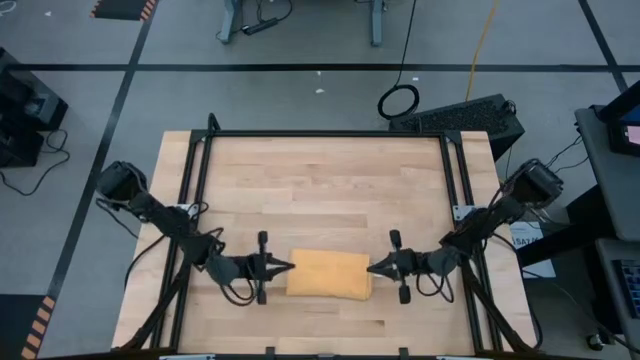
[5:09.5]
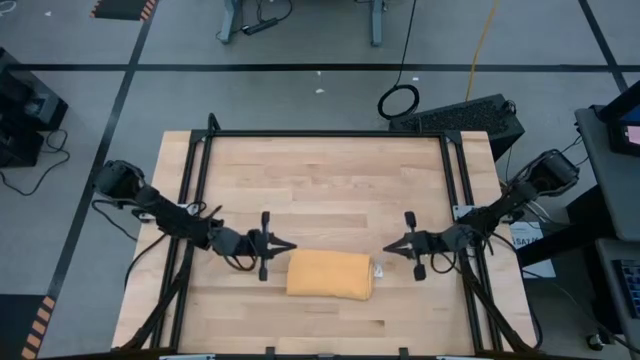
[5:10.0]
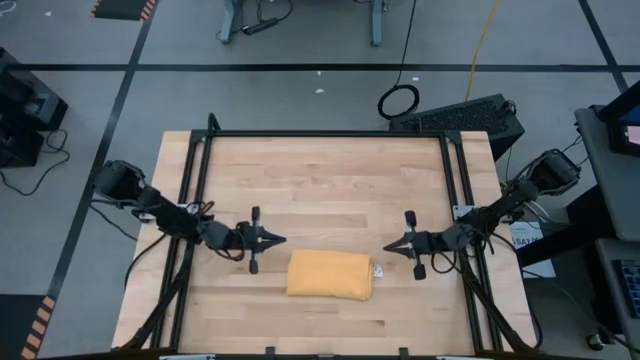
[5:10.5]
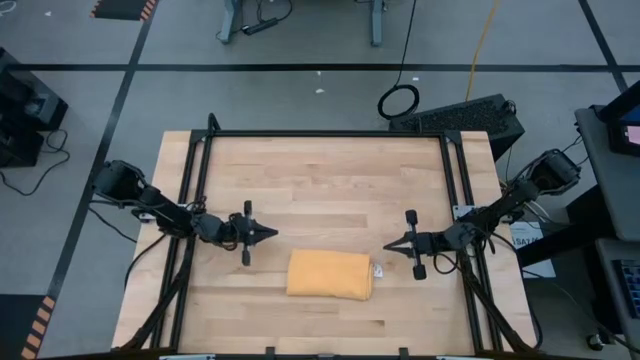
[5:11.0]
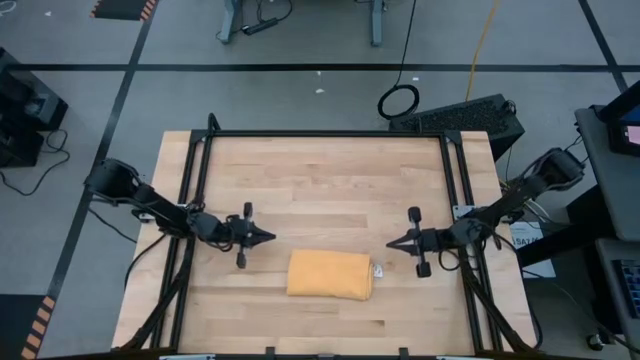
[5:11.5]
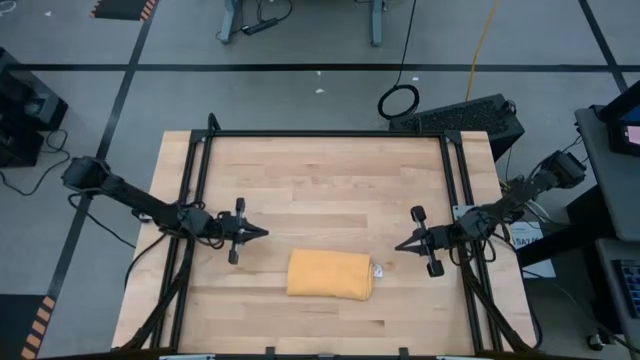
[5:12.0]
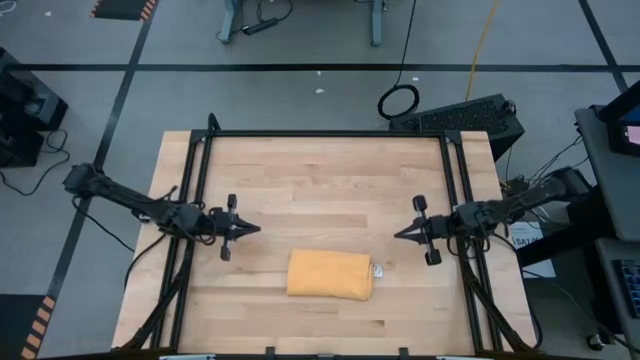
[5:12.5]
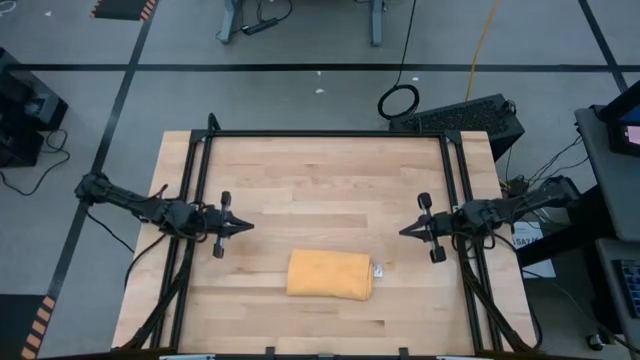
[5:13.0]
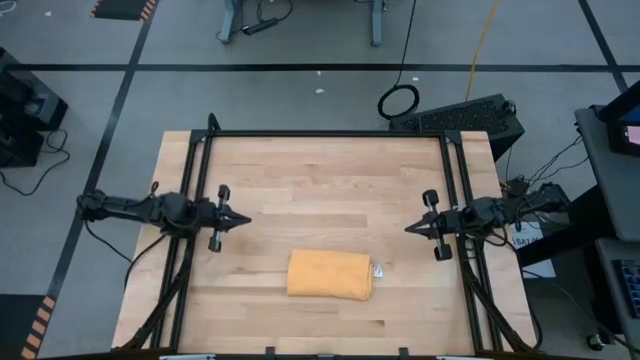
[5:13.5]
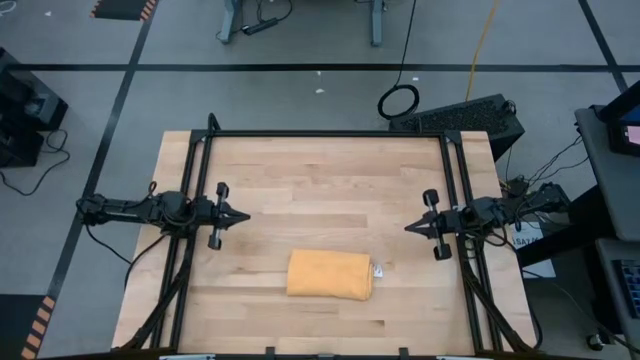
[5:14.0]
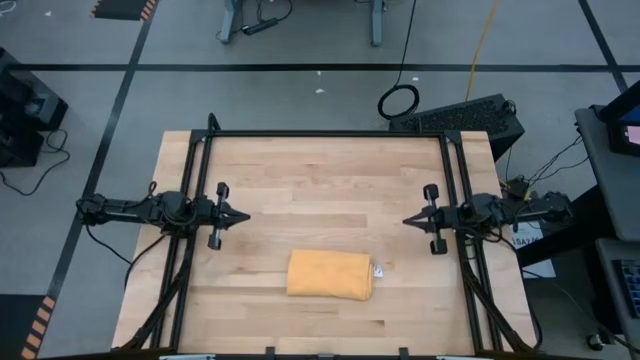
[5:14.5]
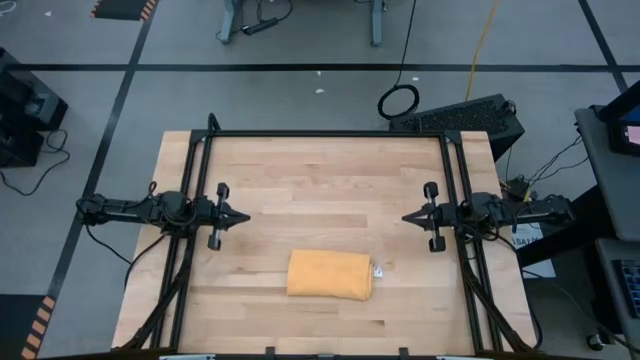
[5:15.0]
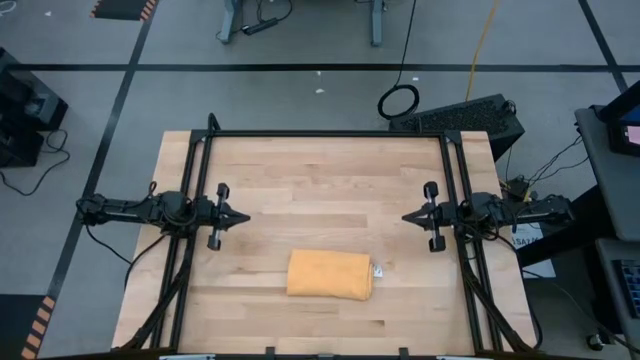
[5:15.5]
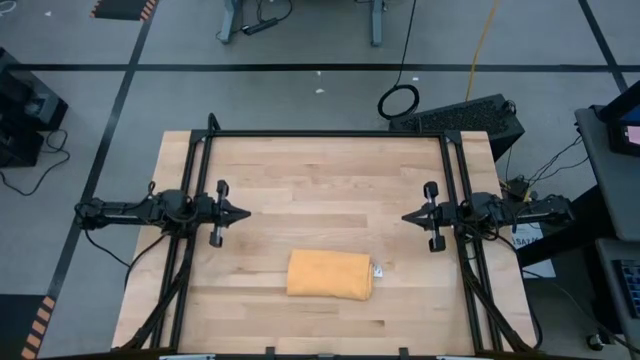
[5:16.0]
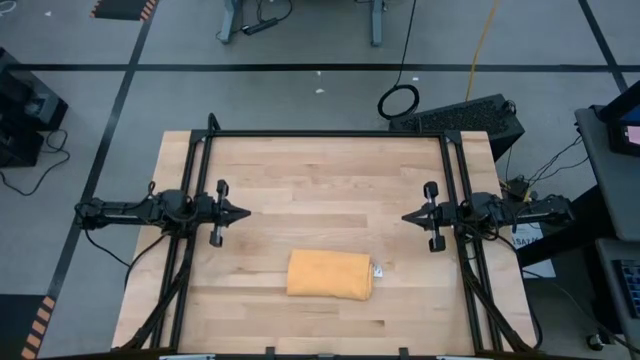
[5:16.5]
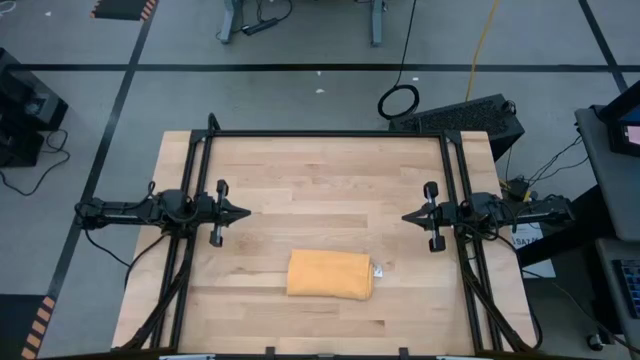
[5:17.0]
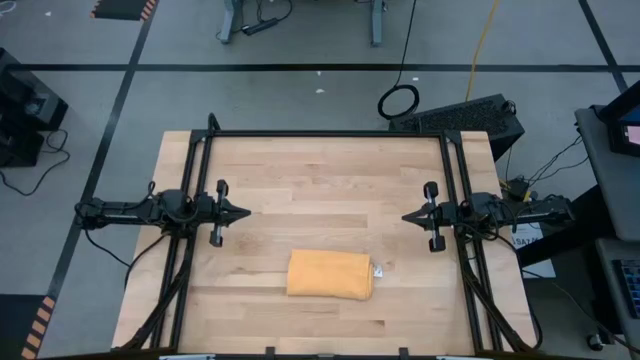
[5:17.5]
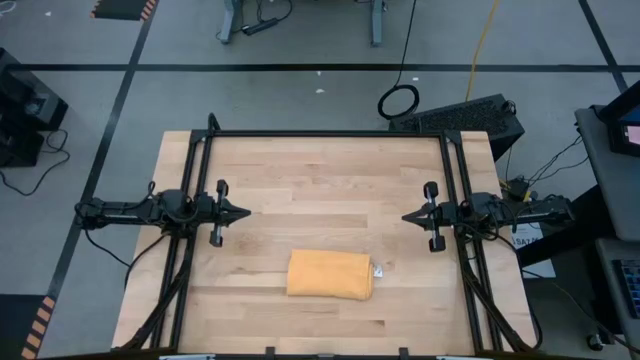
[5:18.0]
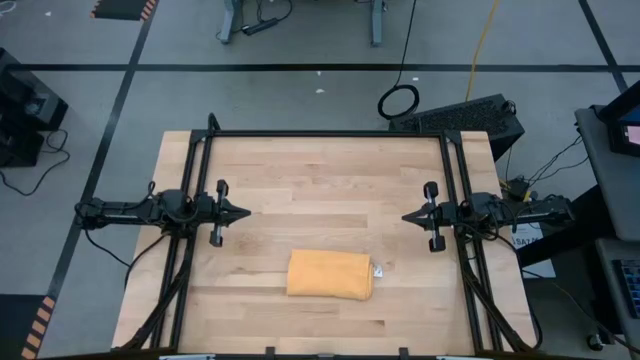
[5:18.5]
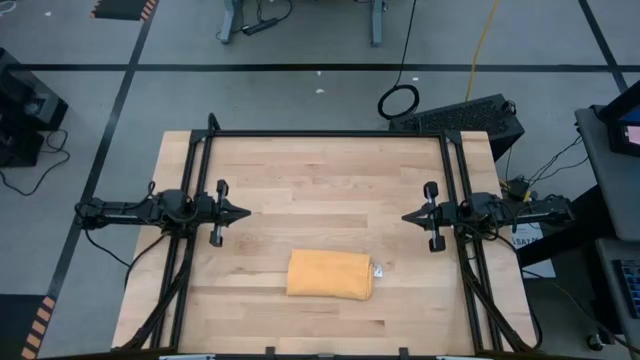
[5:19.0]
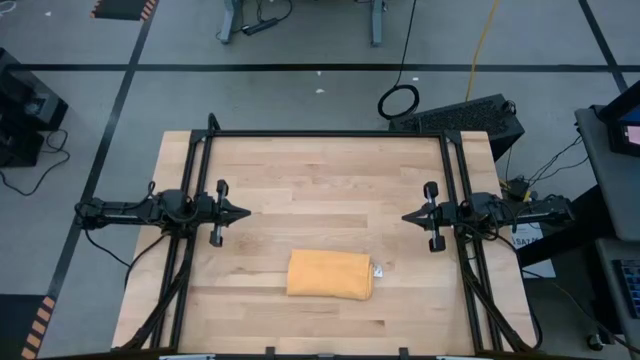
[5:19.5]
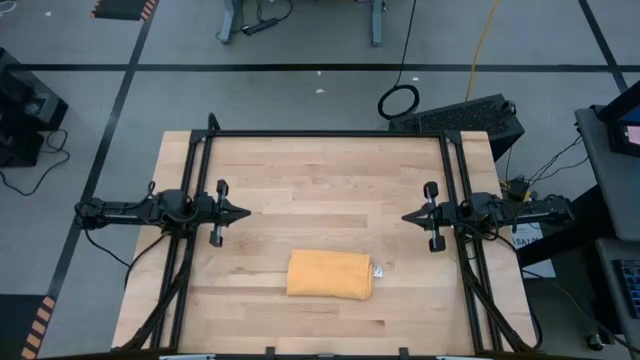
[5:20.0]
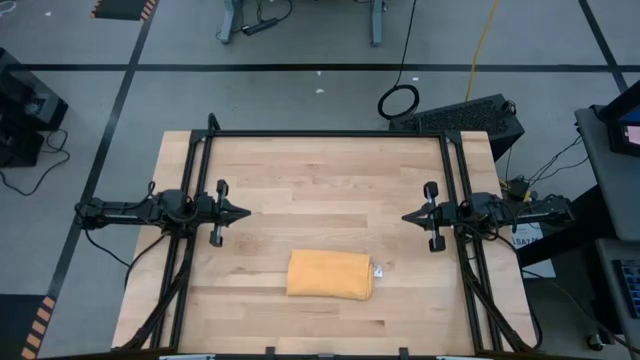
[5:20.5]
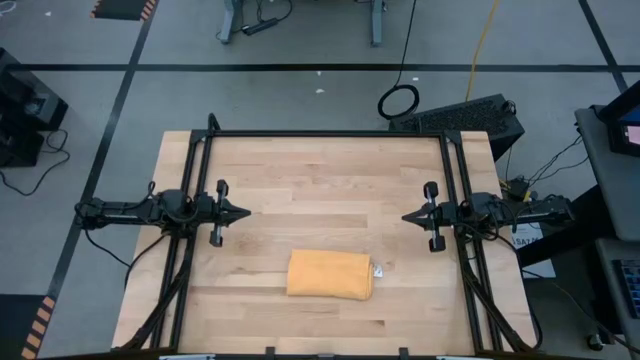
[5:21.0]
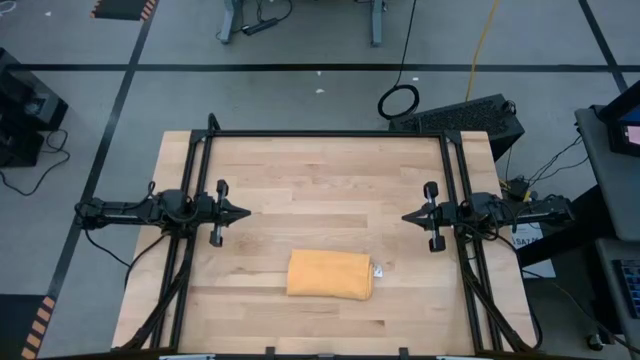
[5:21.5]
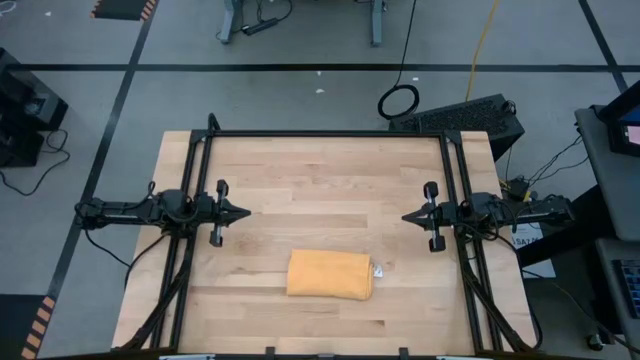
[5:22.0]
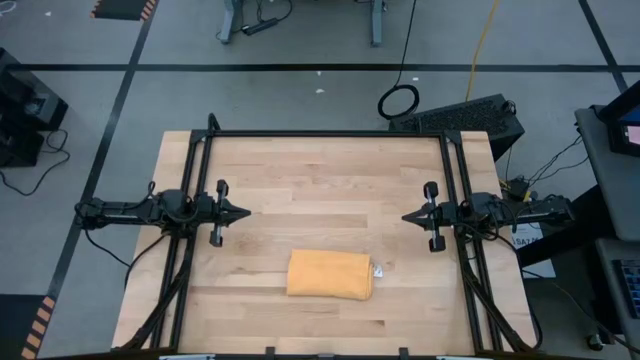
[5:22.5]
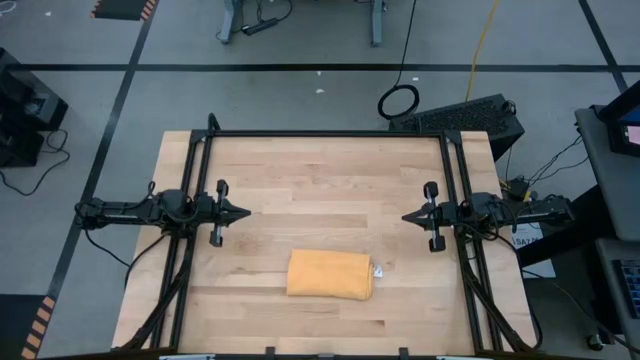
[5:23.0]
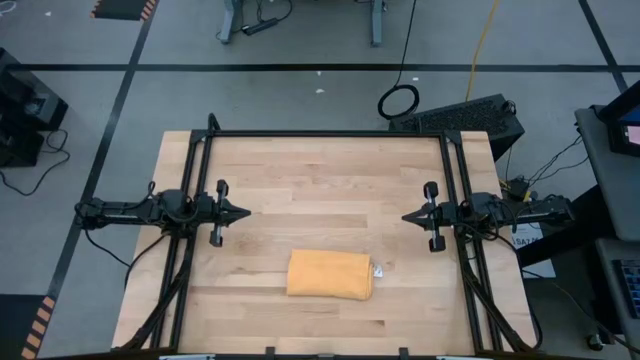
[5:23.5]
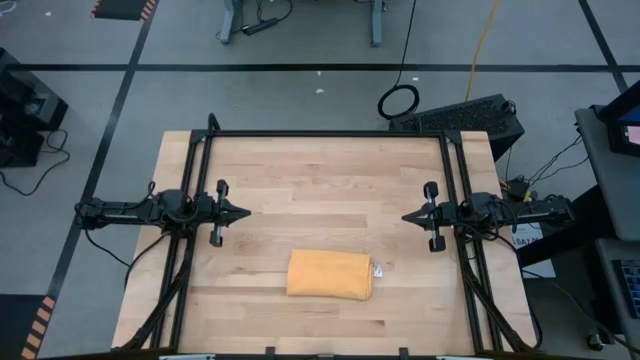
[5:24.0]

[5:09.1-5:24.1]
Task: Roll towel
Return to Home Position

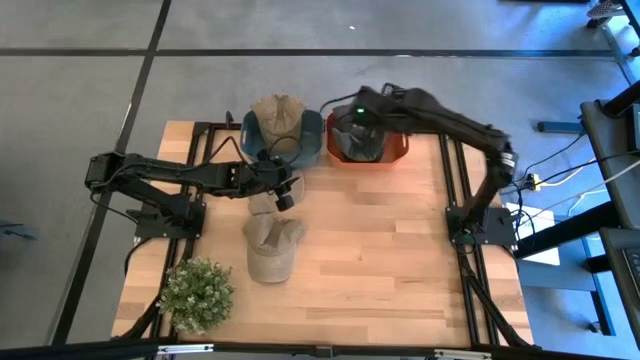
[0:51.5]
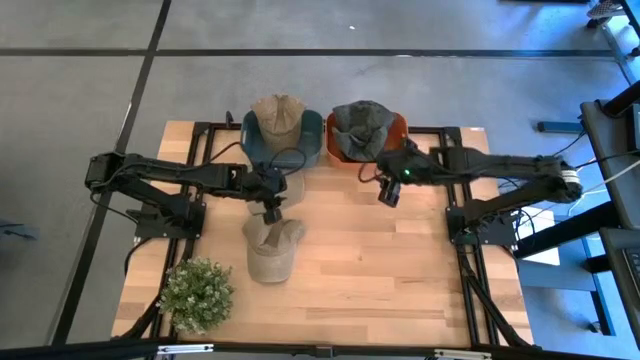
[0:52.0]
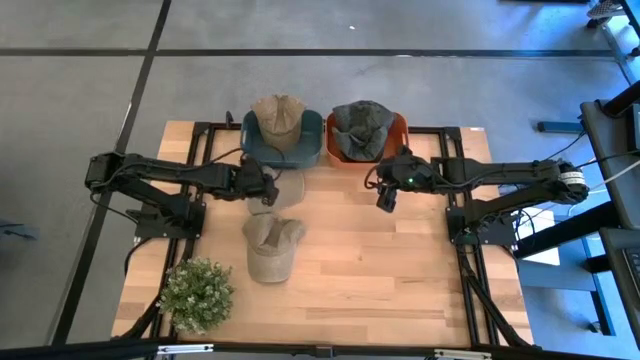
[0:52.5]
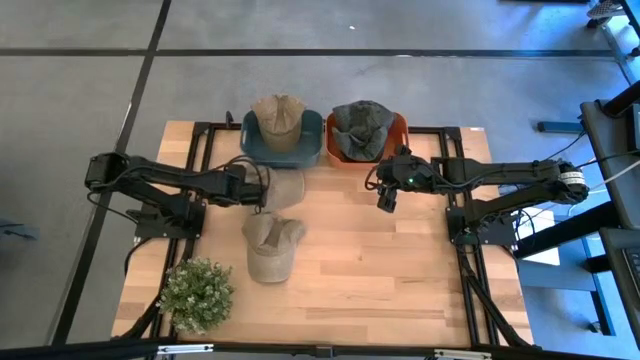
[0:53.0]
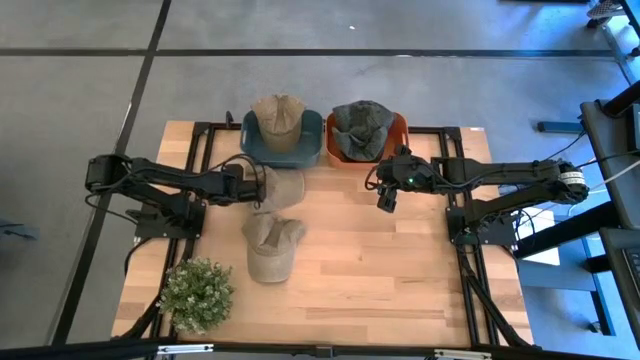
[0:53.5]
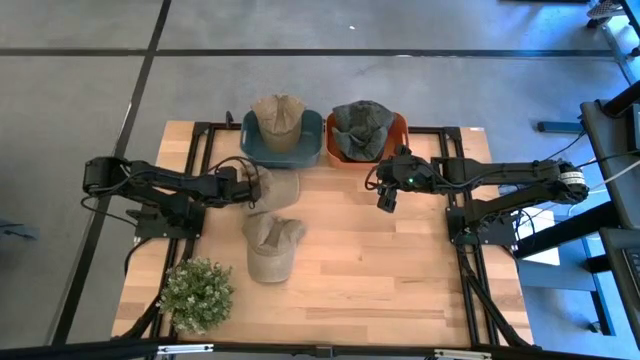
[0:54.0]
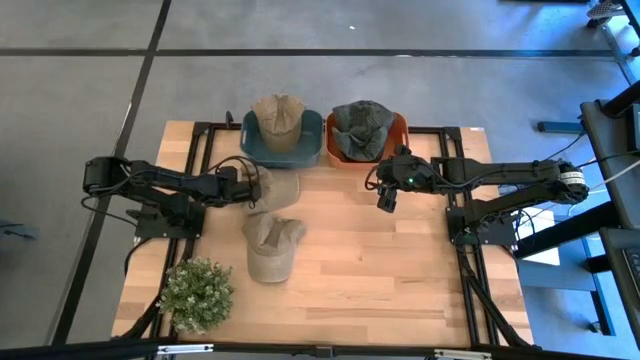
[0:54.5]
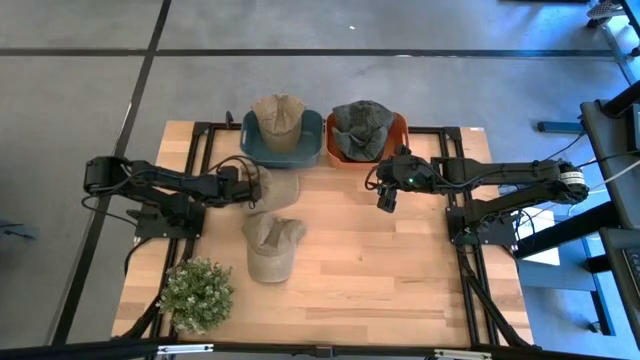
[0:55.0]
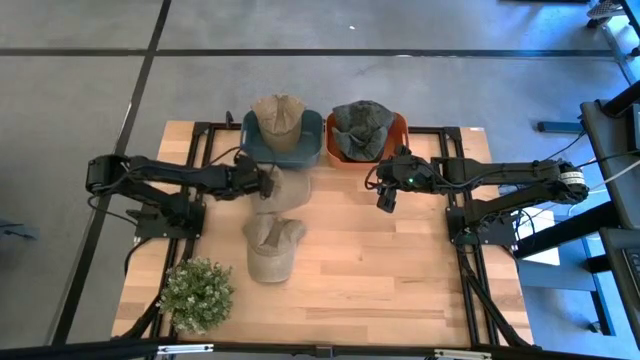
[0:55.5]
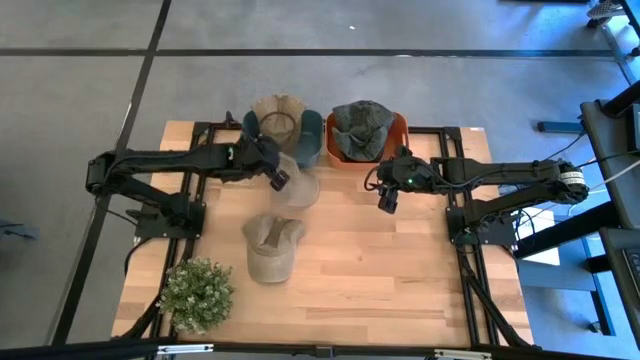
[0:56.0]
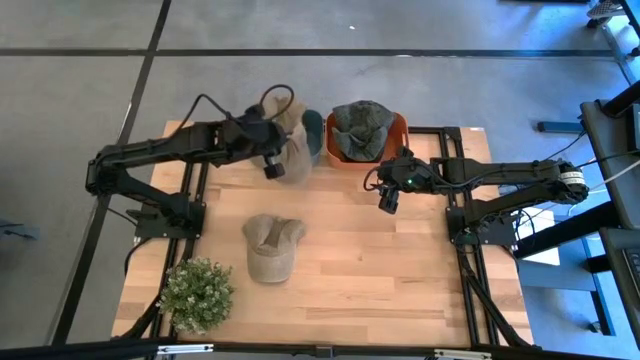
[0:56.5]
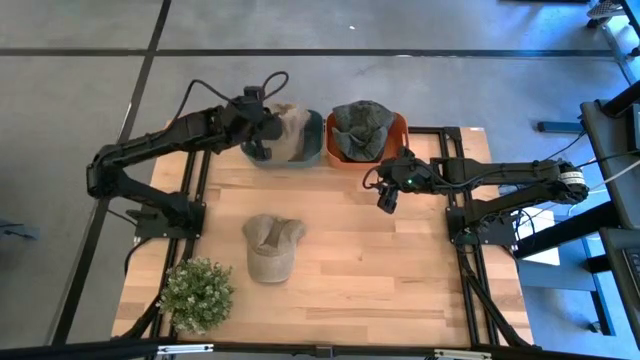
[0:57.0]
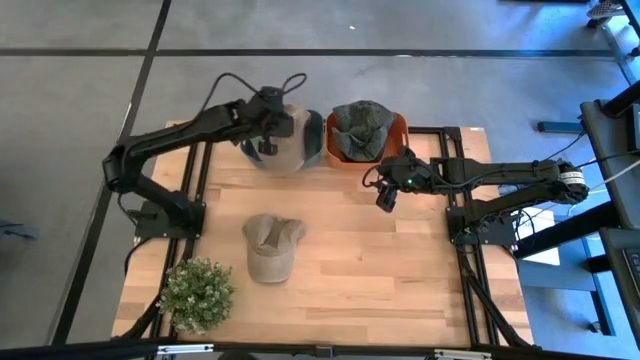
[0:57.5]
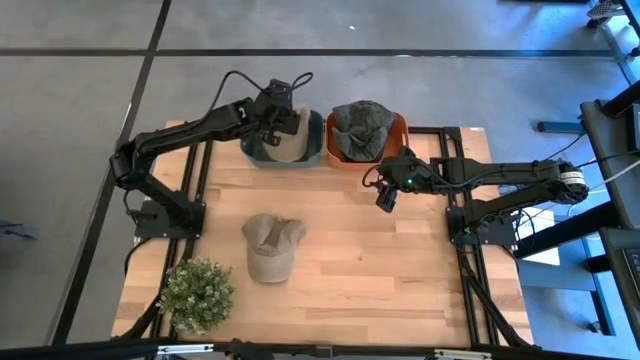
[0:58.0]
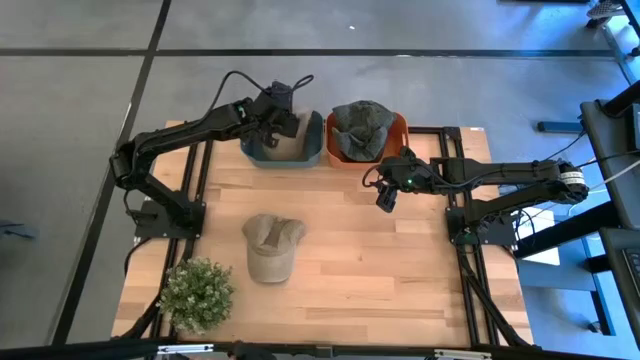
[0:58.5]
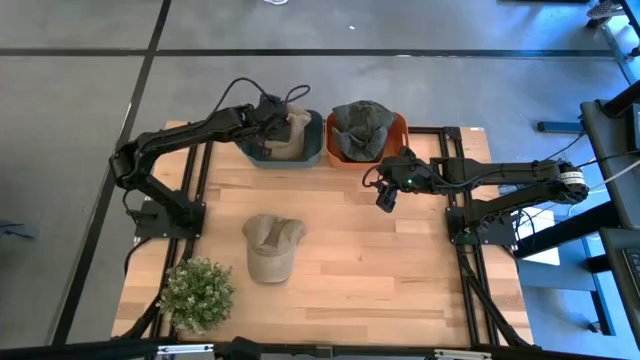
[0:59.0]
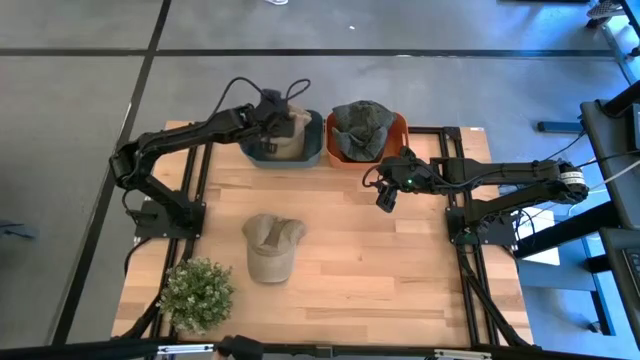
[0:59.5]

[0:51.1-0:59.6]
Task: Pick & Place hat
Put the top brown cap into the dark blue bin
